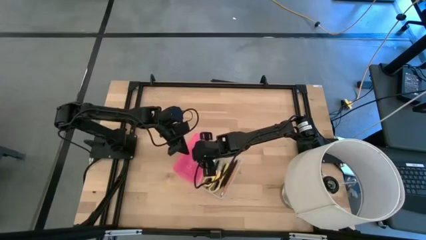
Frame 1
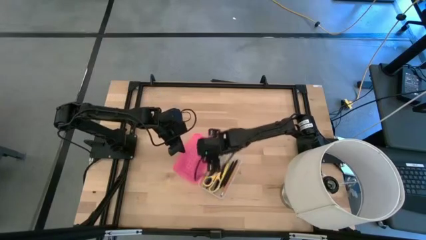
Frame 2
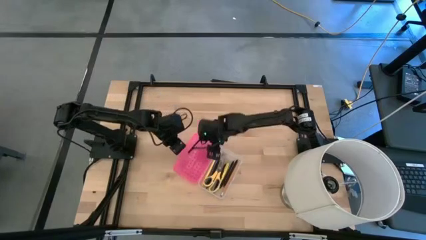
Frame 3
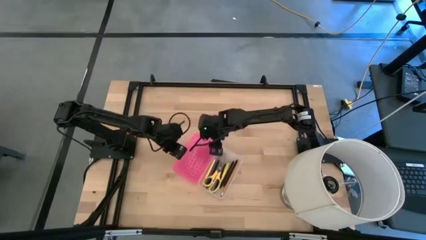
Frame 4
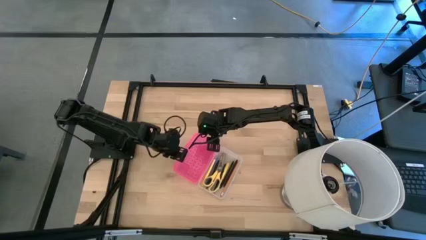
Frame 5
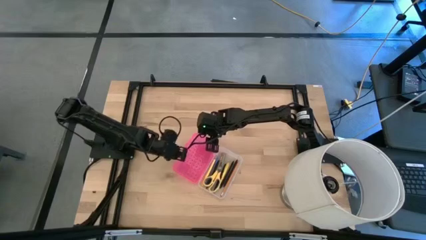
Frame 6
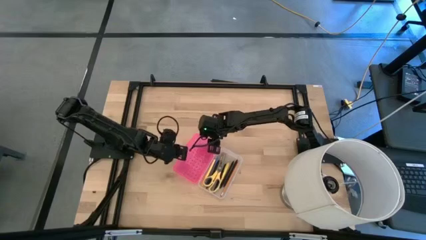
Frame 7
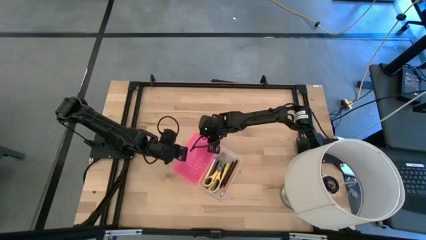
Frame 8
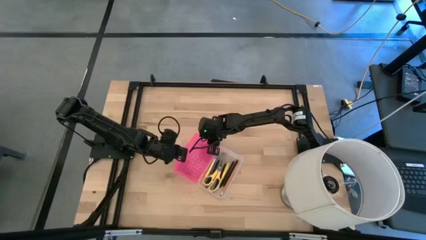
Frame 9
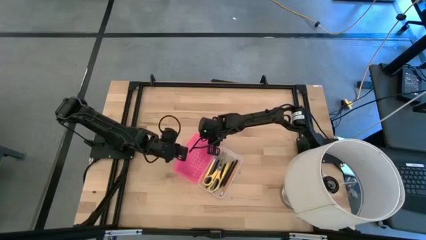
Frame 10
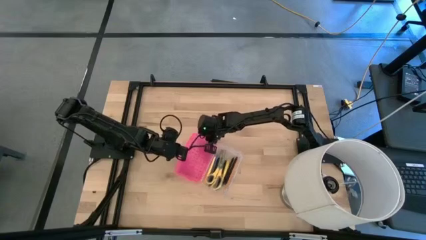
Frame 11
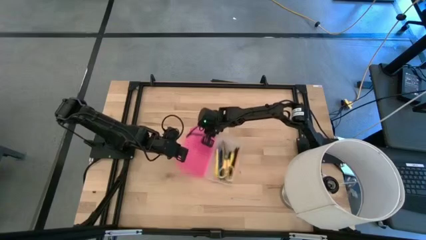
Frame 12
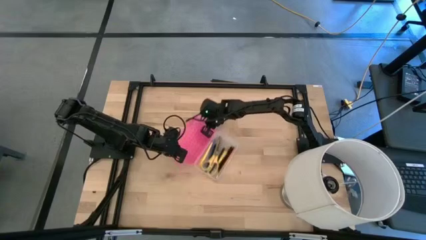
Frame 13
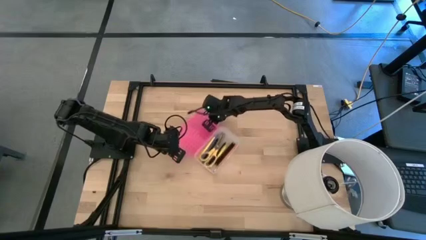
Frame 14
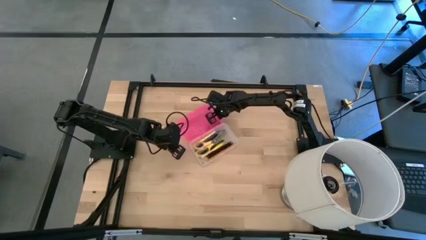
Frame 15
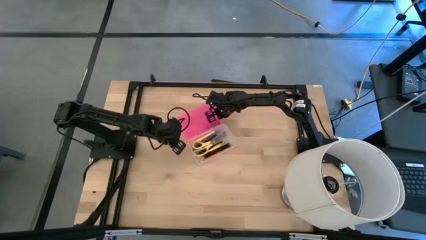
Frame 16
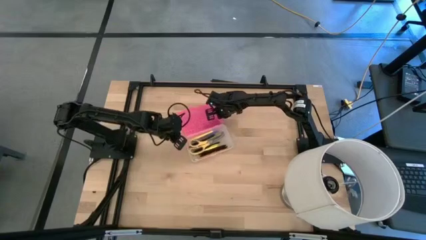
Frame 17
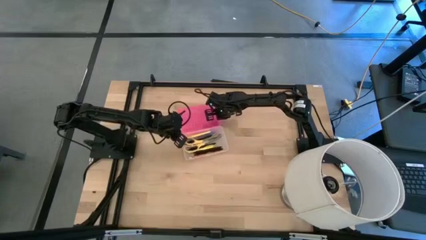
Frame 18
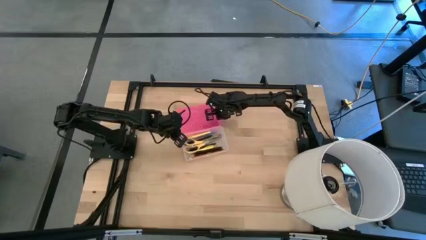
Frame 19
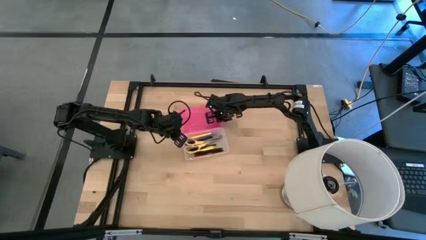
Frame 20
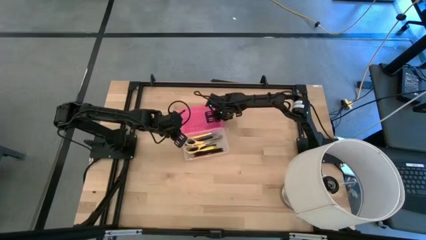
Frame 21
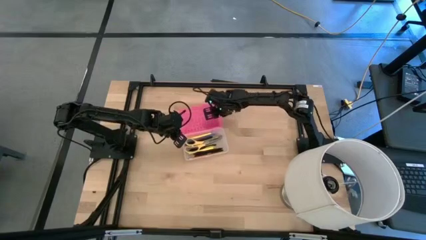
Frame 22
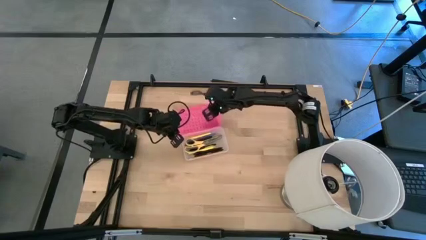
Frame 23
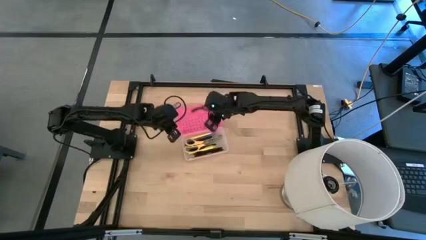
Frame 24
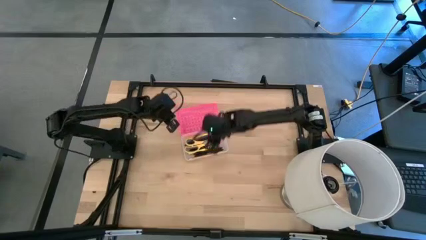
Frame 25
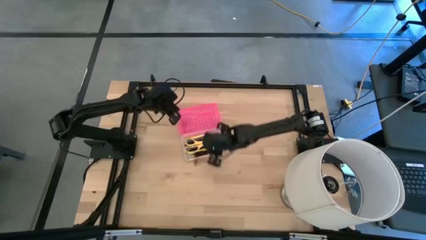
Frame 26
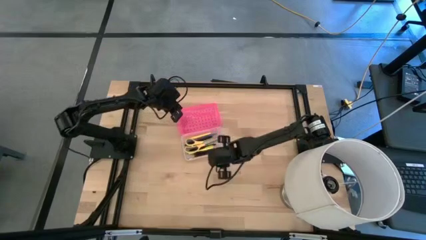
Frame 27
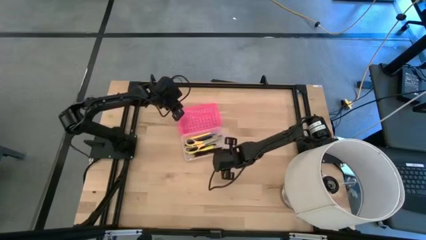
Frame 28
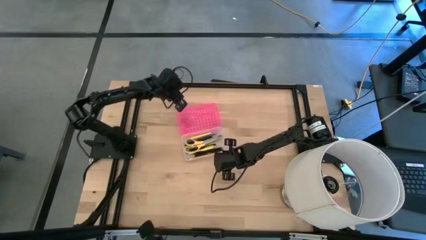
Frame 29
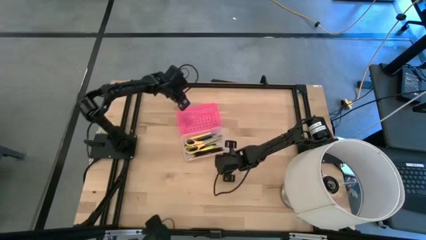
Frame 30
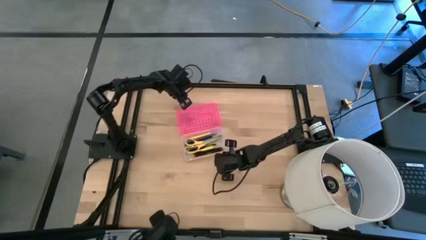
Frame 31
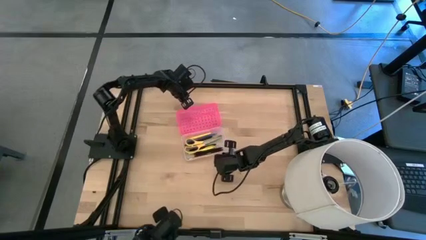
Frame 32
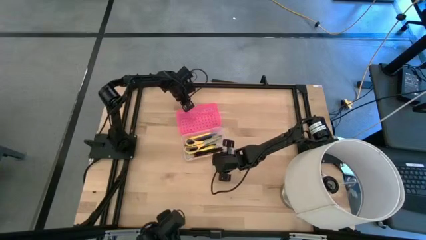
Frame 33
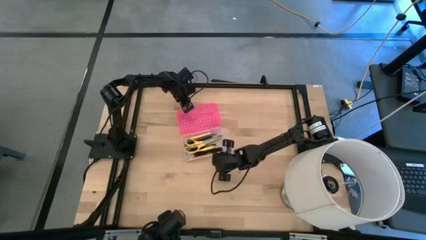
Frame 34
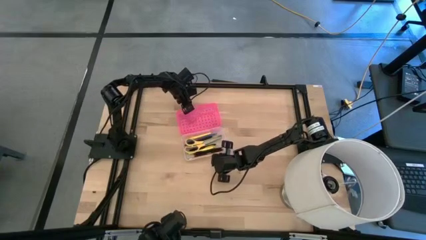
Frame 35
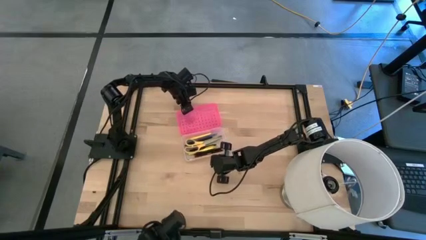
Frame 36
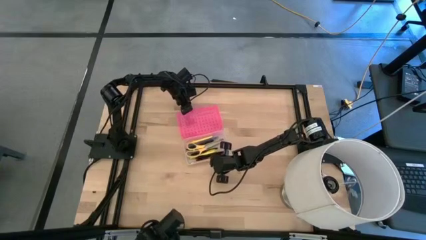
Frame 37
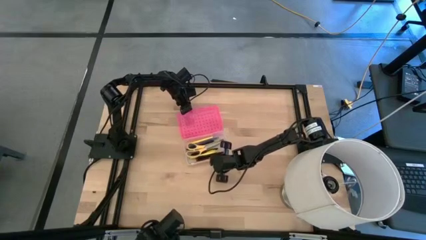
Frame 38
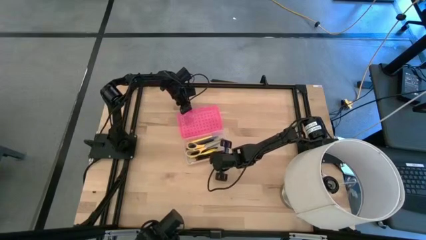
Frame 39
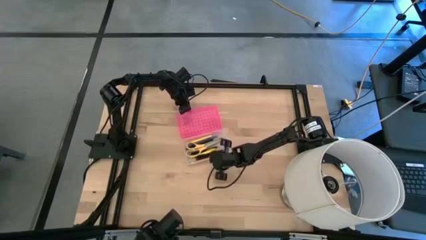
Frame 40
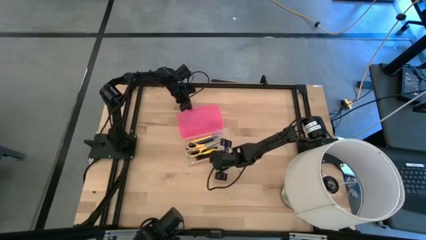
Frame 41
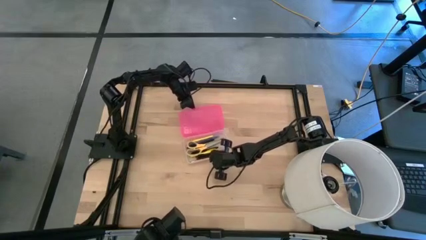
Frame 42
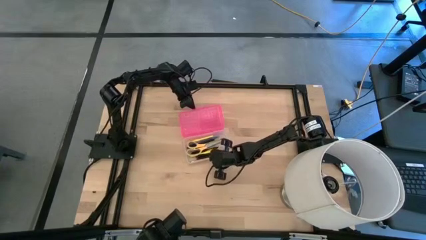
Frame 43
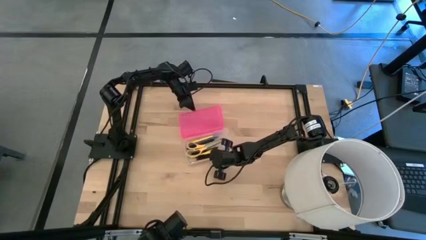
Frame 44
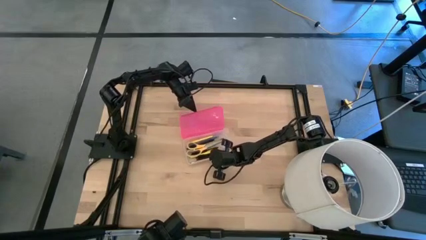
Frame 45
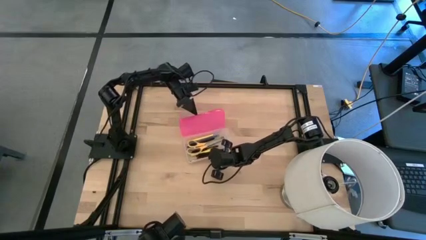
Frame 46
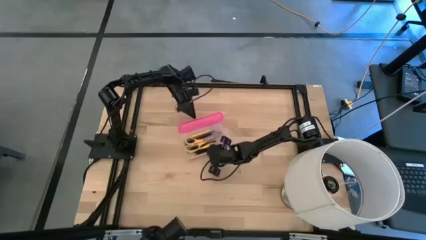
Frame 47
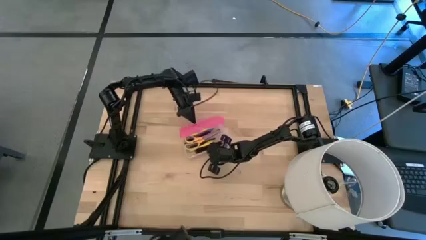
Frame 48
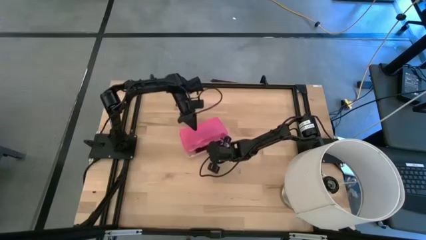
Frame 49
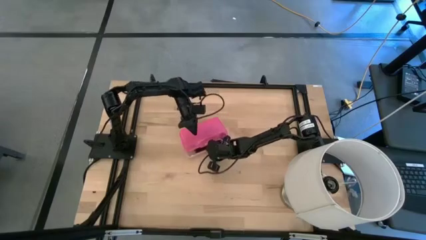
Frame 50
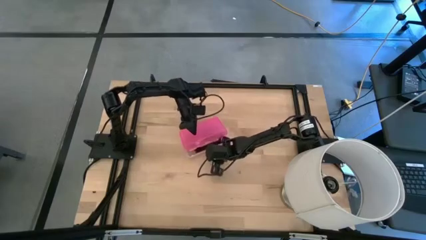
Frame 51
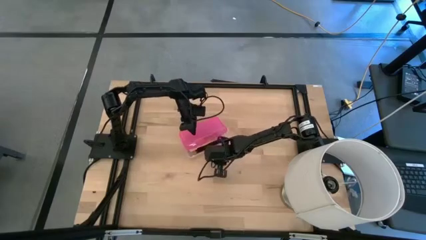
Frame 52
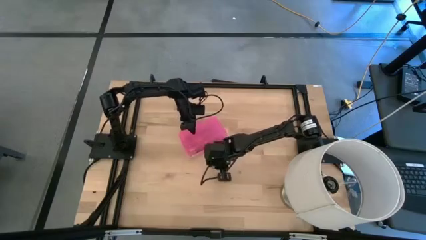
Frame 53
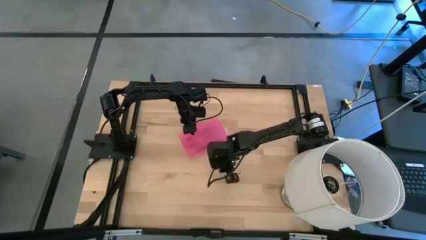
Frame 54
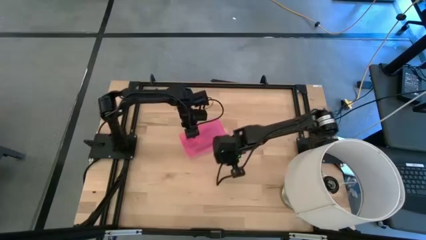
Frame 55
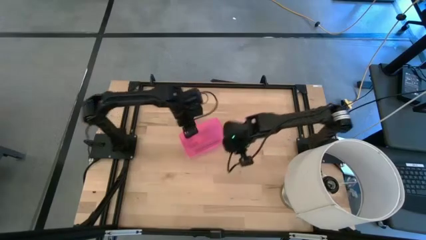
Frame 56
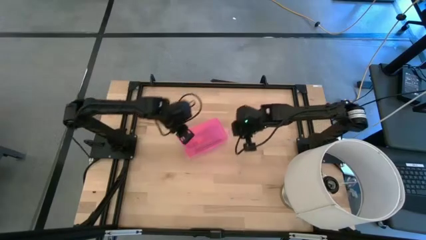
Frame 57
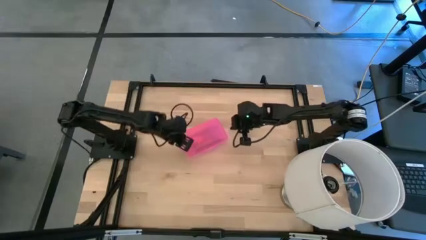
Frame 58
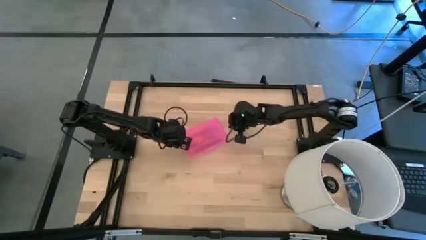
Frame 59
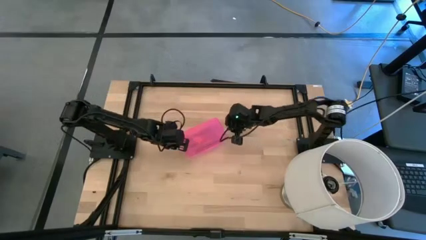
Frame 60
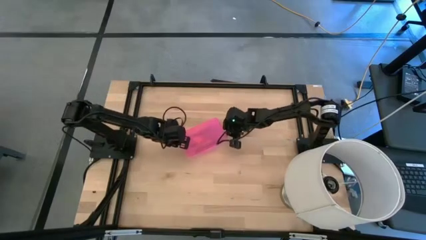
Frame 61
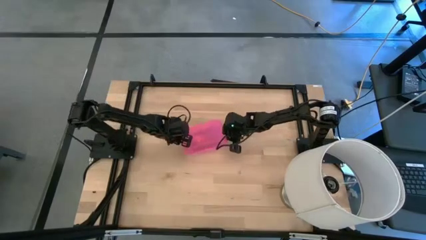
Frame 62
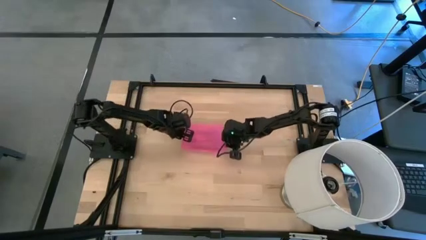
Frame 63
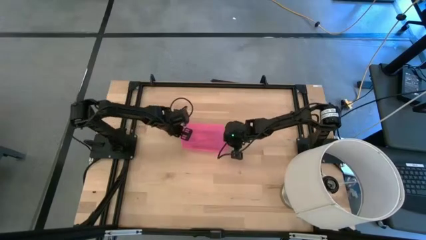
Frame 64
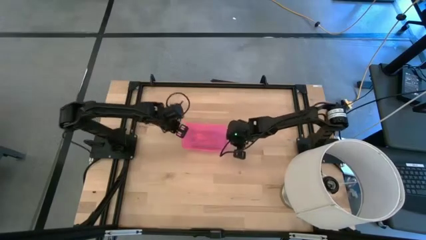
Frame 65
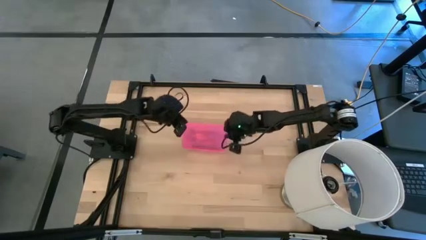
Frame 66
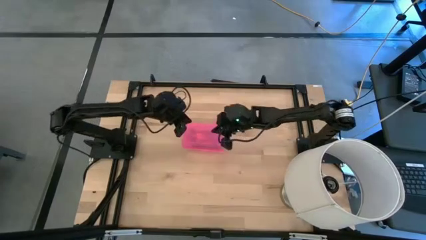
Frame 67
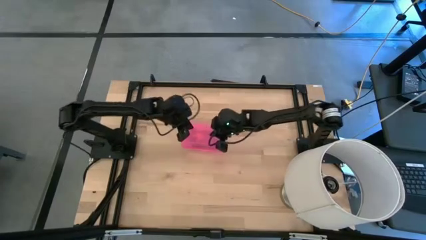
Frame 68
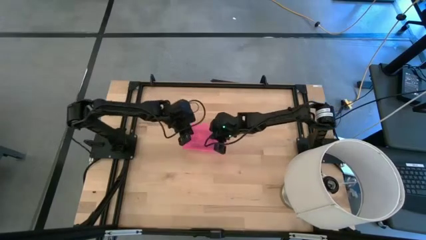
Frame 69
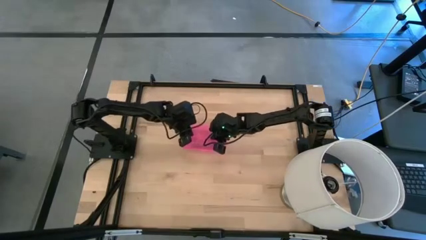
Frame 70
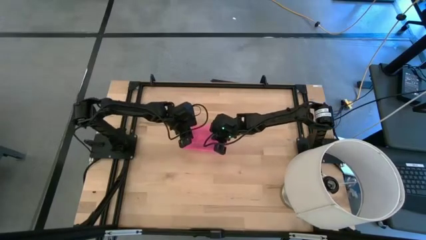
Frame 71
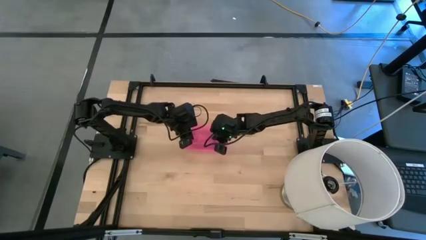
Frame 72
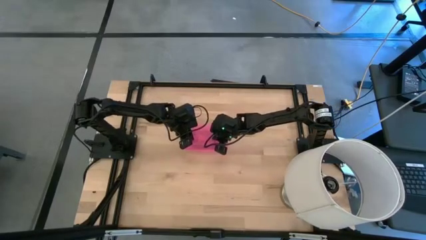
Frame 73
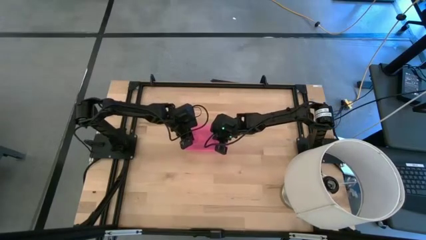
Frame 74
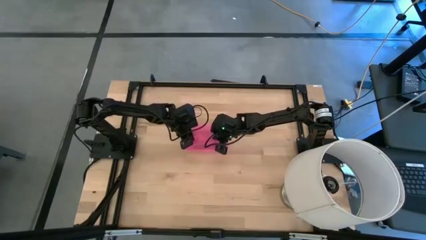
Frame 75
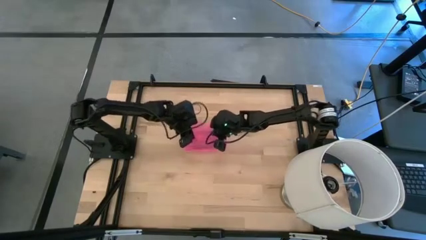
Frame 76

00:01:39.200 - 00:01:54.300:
Task: Pick & place school supplies into a supply box
Close the pink supply box

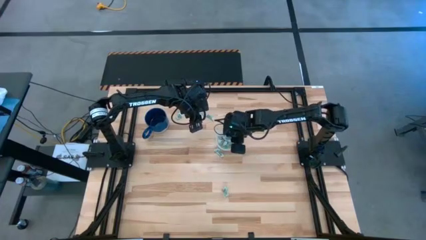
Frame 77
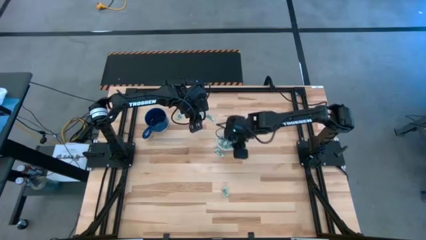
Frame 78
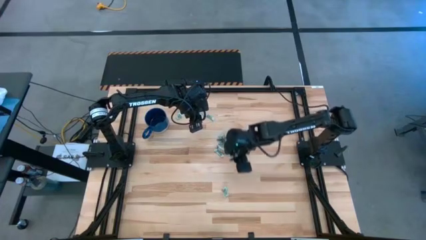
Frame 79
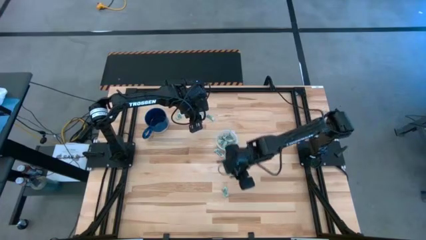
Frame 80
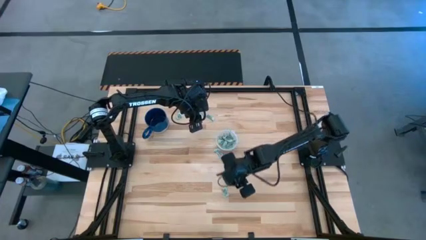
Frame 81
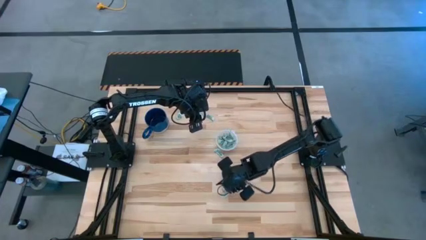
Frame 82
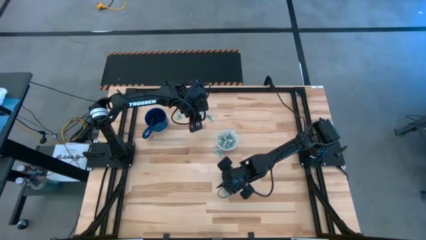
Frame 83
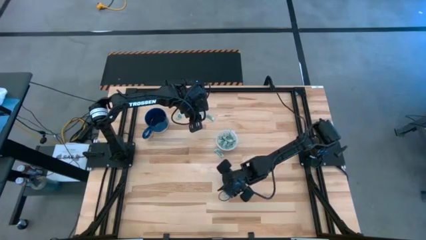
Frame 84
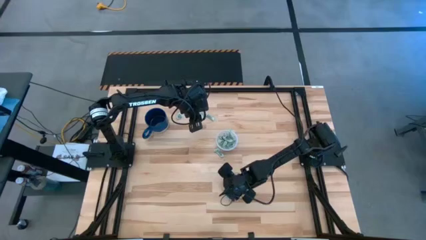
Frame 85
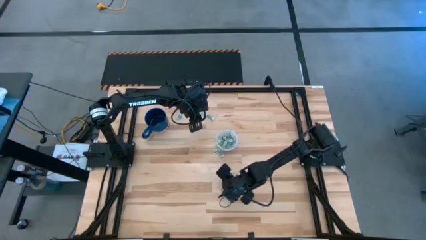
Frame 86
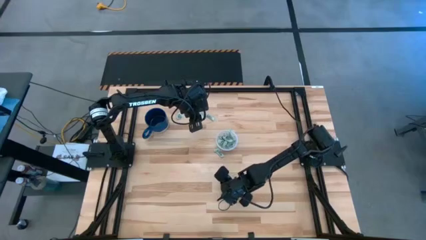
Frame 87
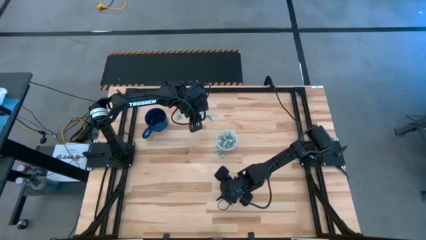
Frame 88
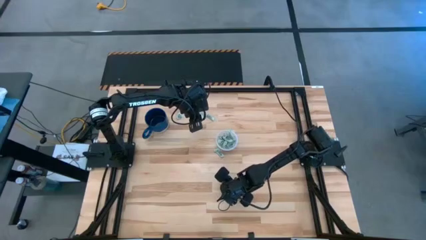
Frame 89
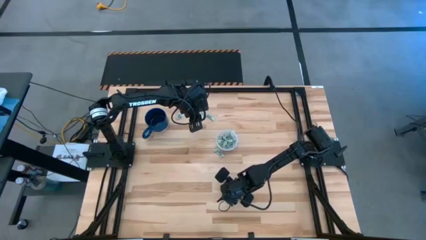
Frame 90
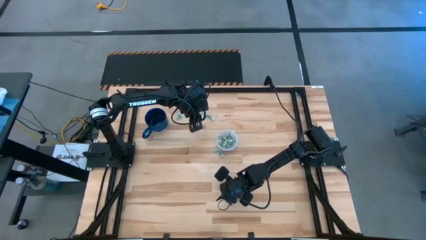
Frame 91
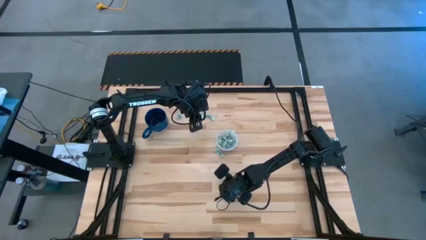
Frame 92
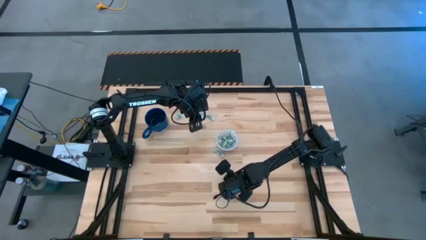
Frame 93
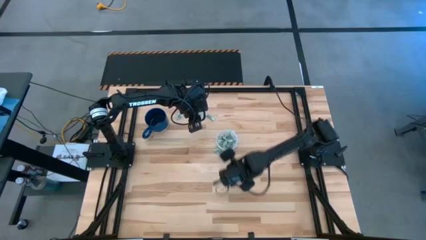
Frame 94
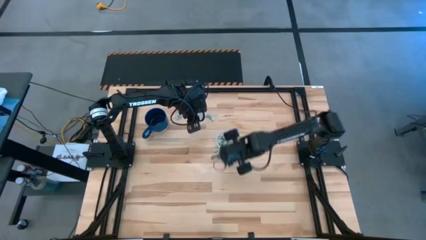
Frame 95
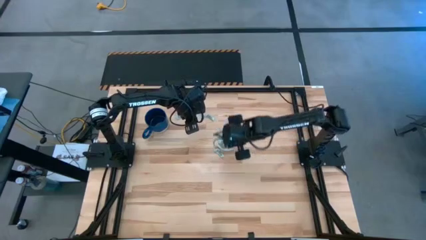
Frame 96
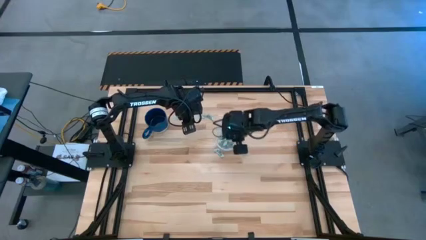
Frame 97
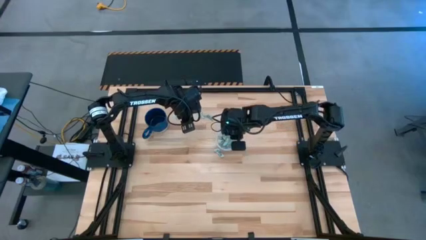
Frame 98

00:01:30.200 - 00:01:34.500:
Task: Pick and place items into bin
Put the gray stevia packet into the transparent bin
